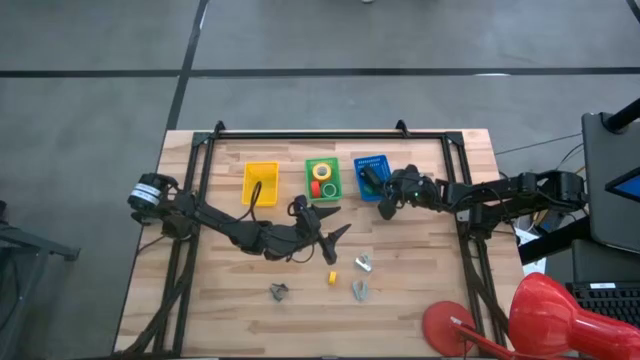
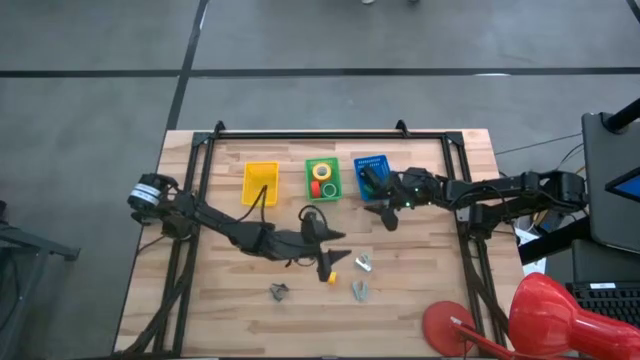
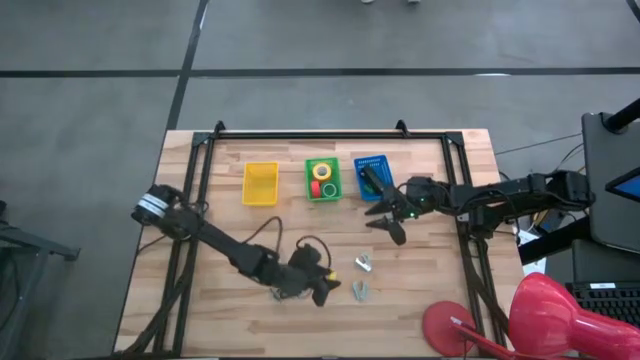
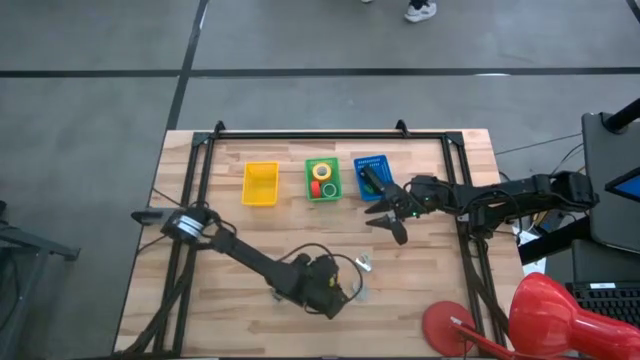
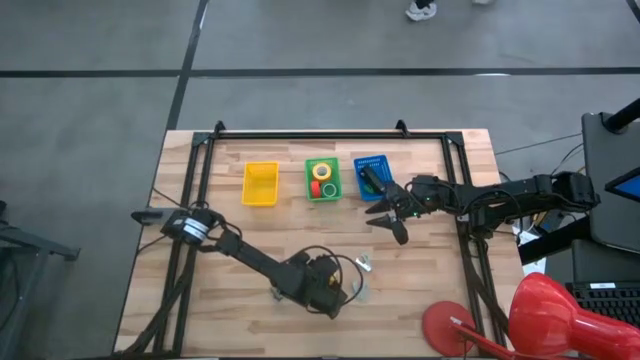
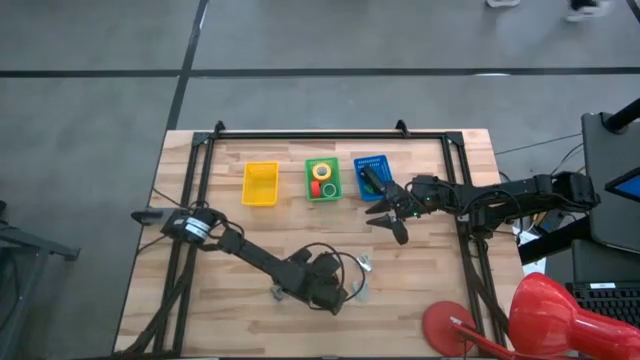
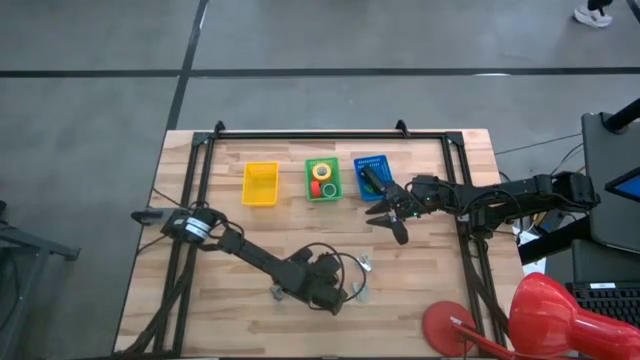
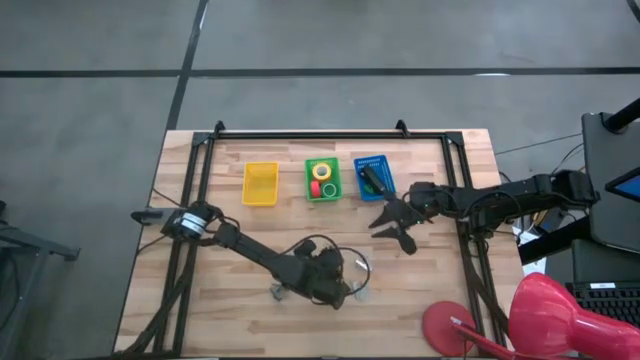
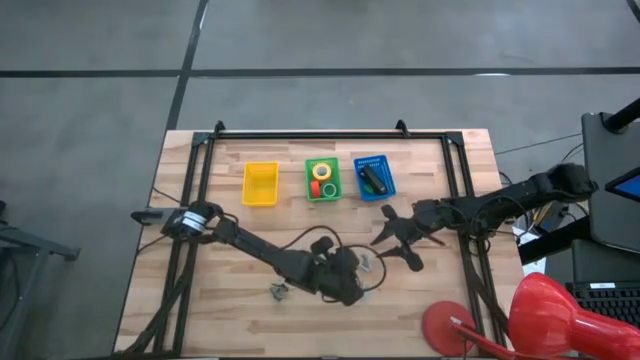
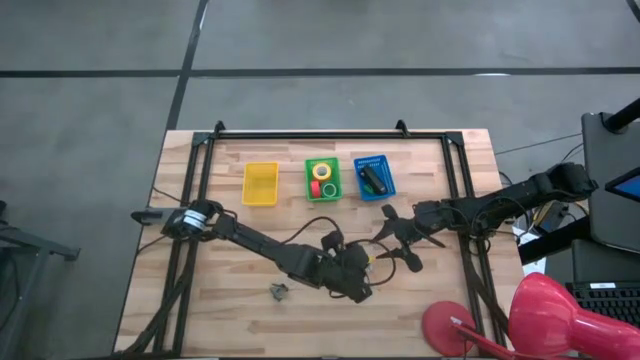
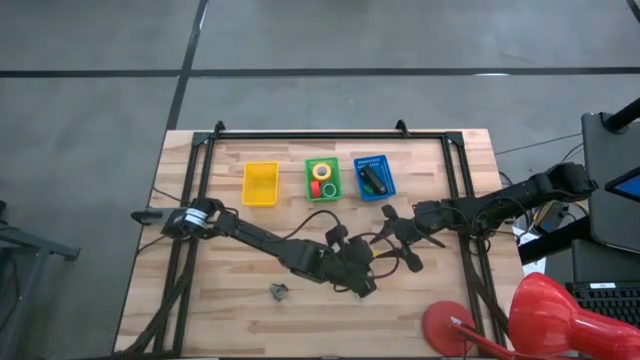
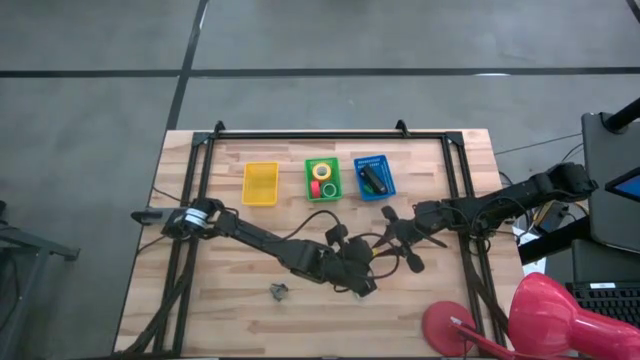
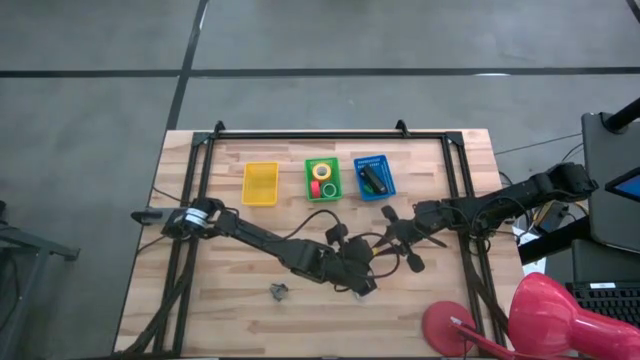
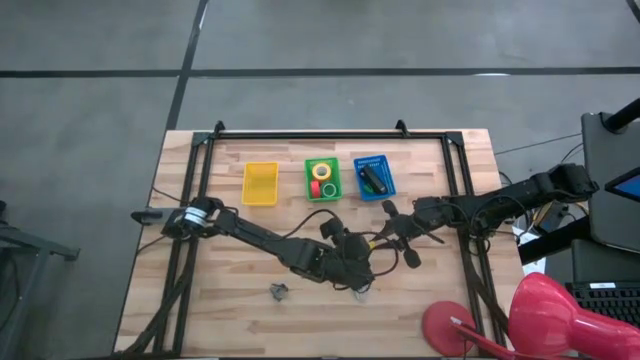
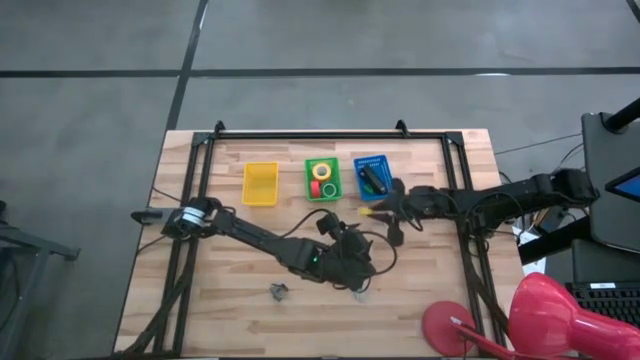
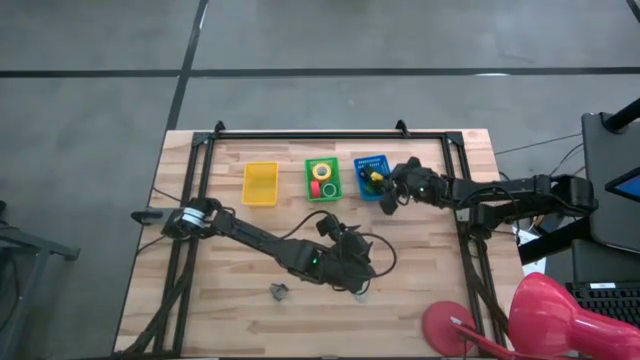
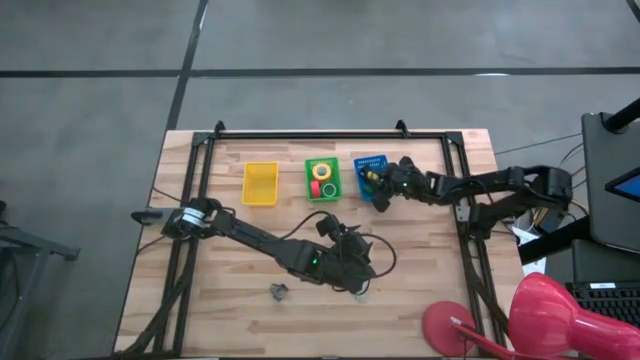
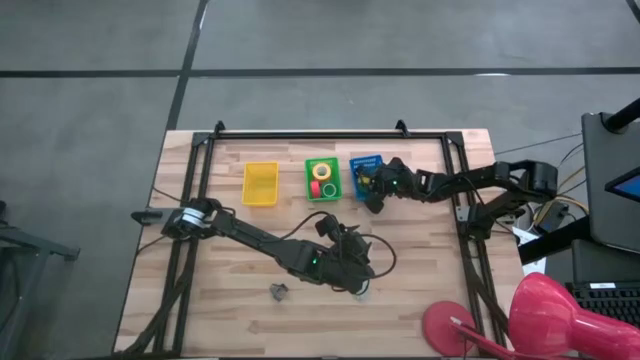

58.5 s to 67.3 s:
Task: Pick and place Stapler, Stapler remover, tape
Put the small yellow stapler into the blue bin

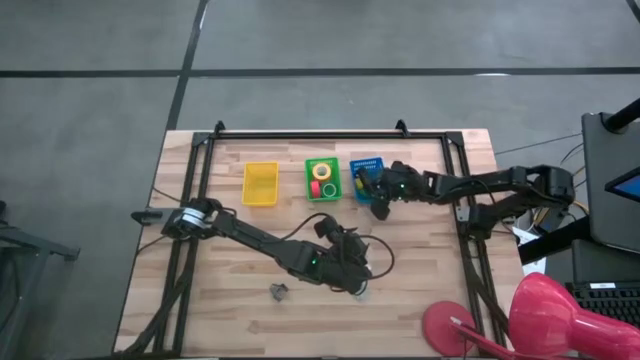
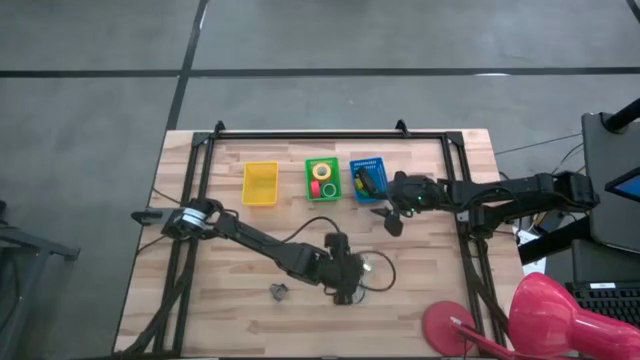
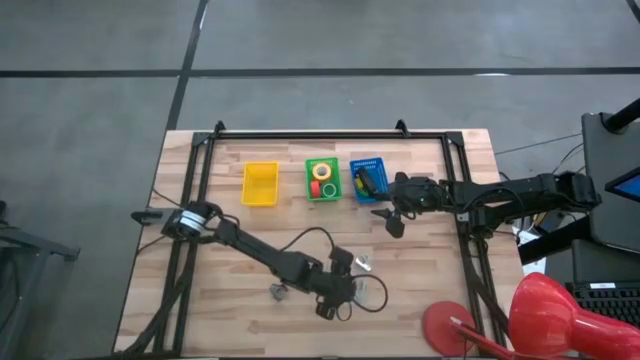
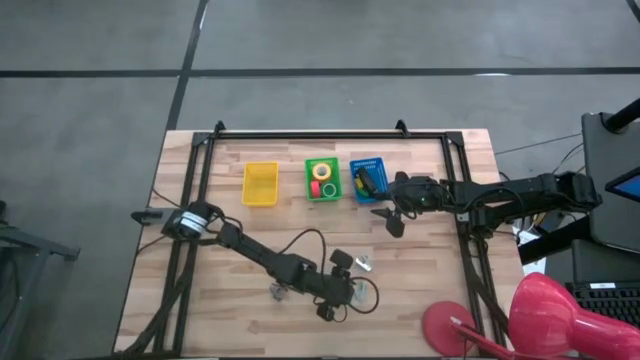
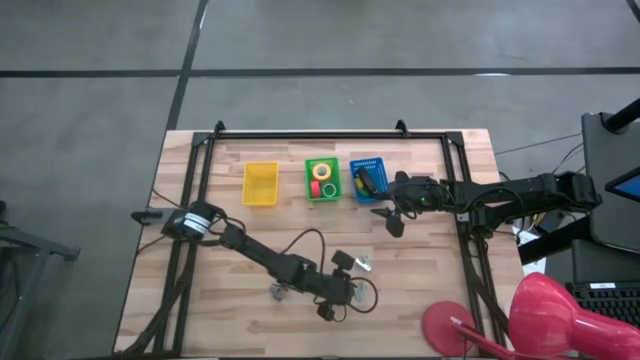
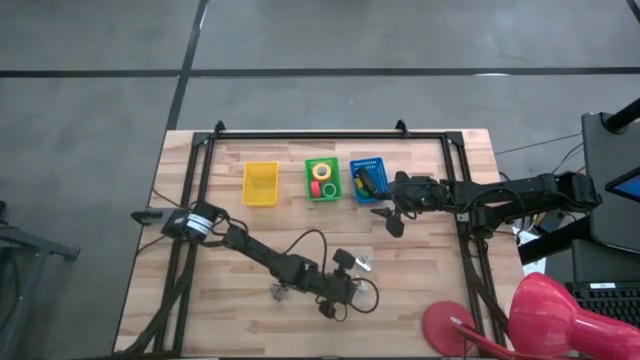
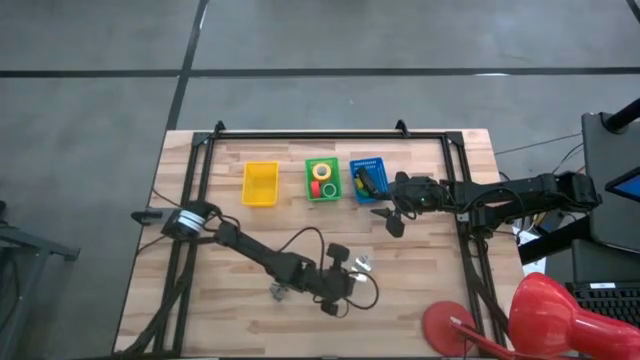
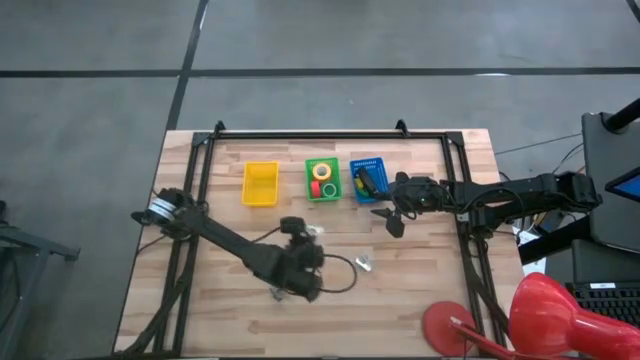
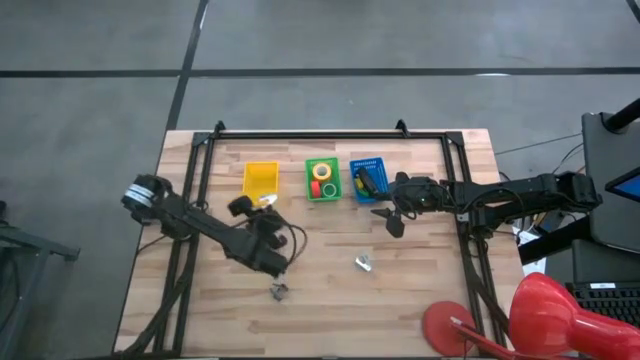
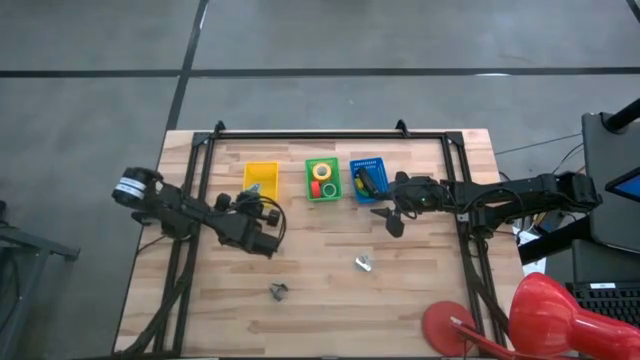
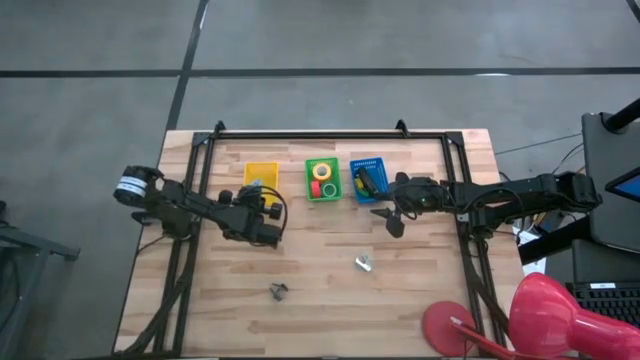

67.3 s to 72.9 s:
Put the bottom light blue staple remover into the yellow bin

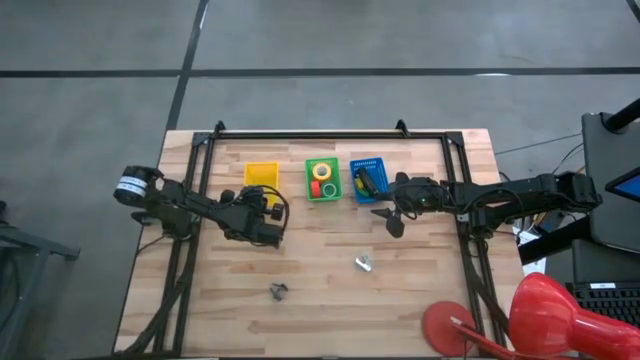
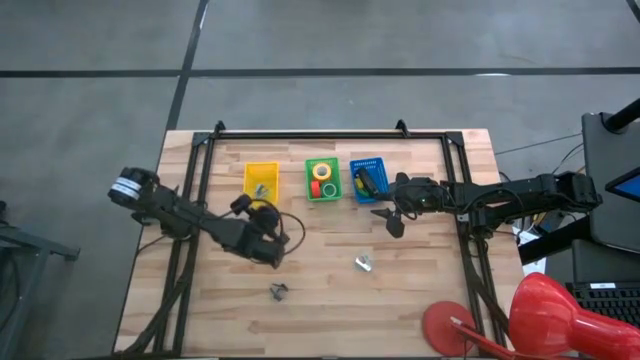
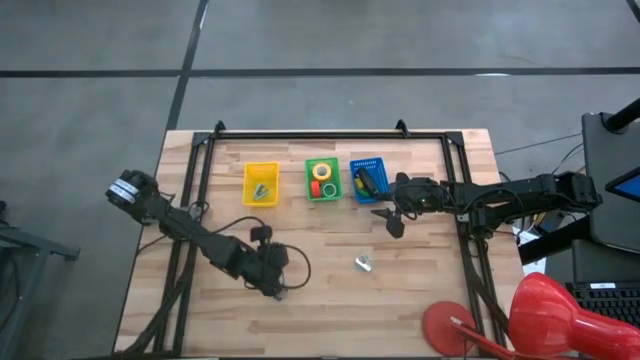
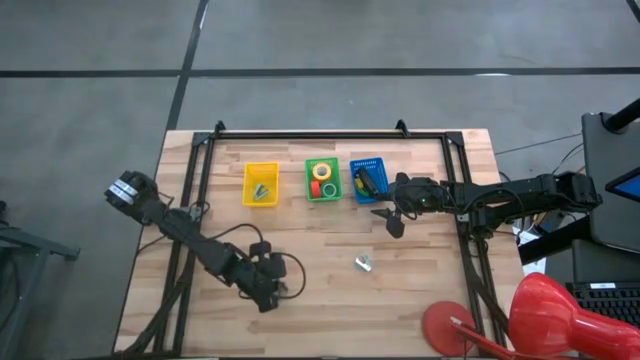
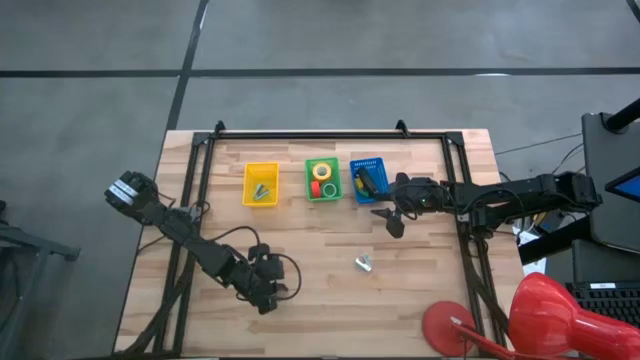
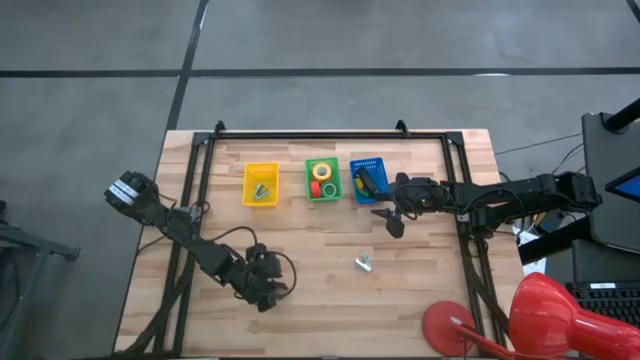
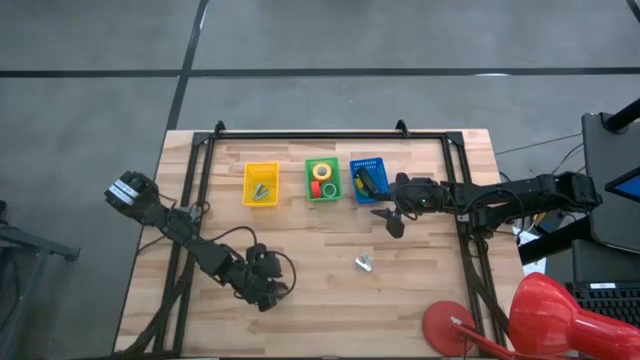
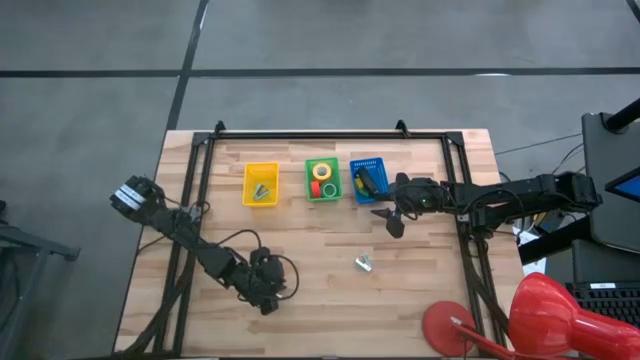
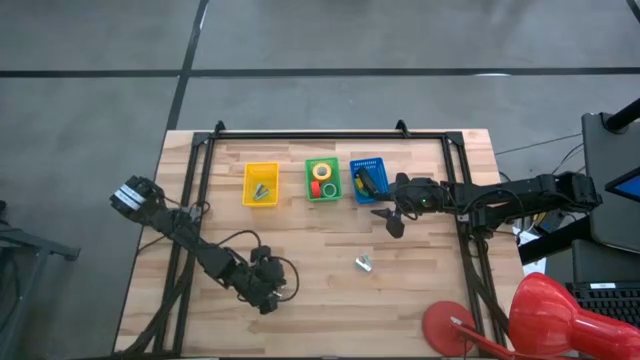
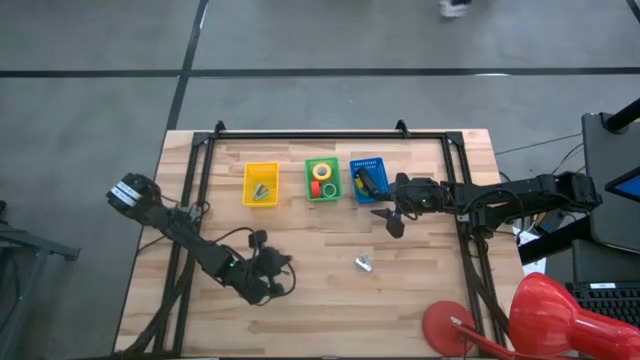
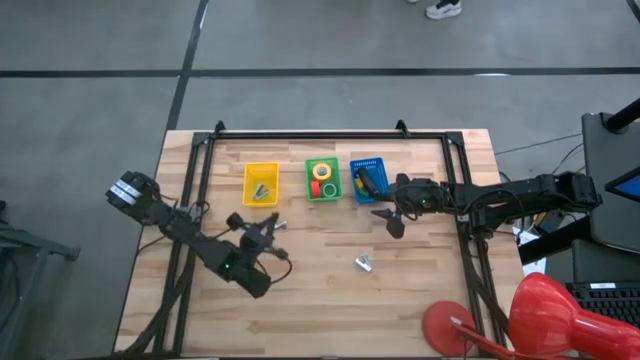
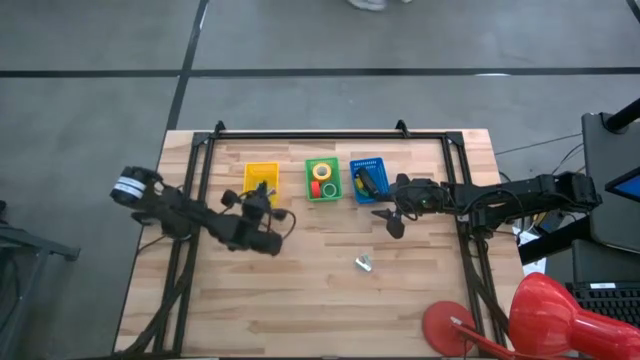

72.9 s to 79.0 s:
Put the black staple remover into the yellow bin

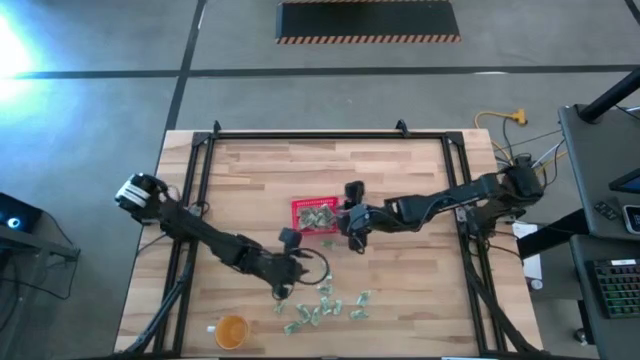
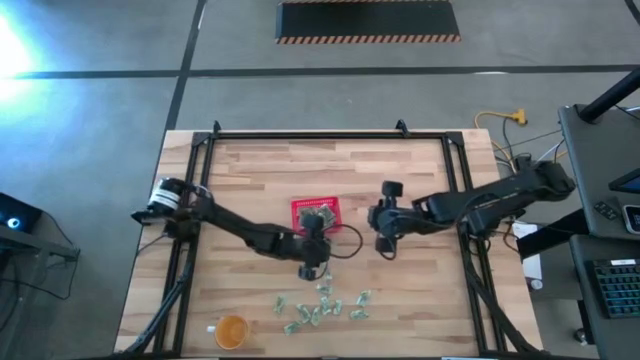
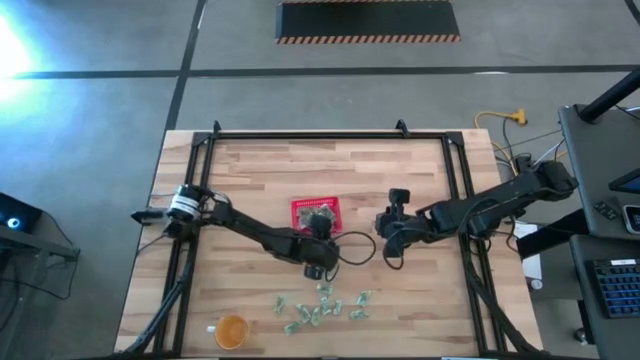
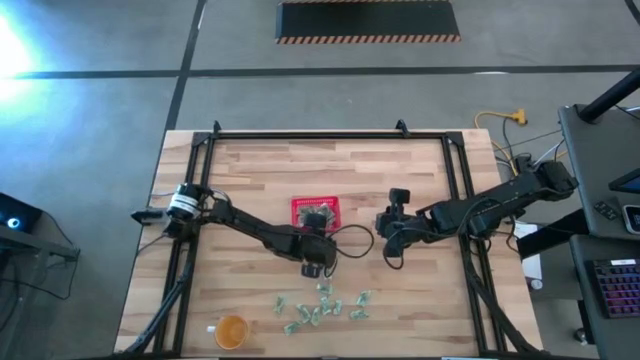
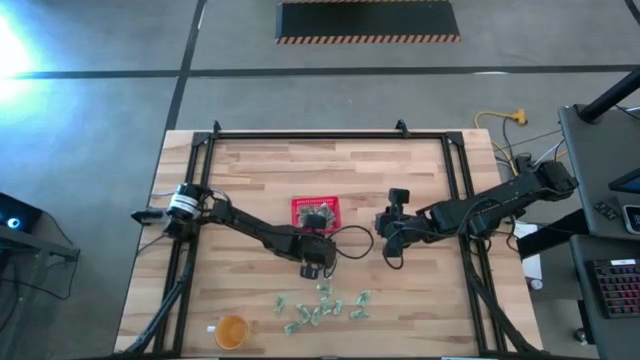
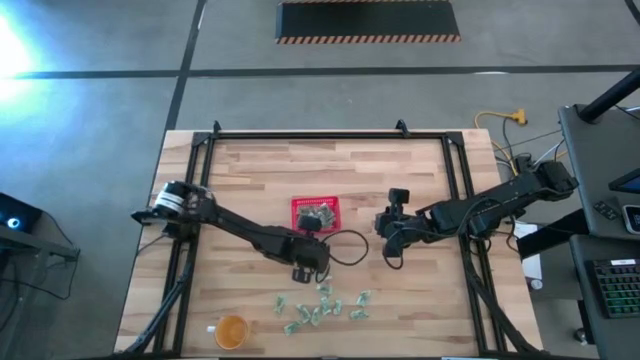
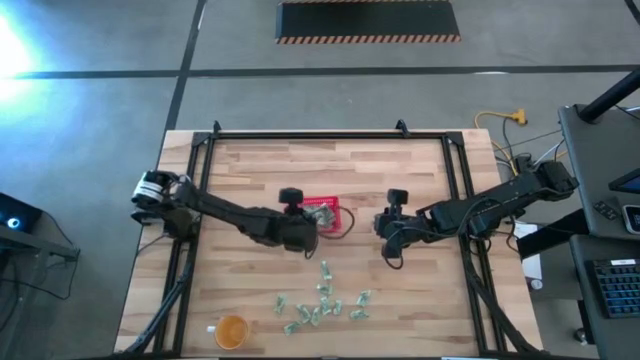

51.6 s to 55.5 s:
Task: Pick and place items into bin
Put the stevia packet into the red bin
